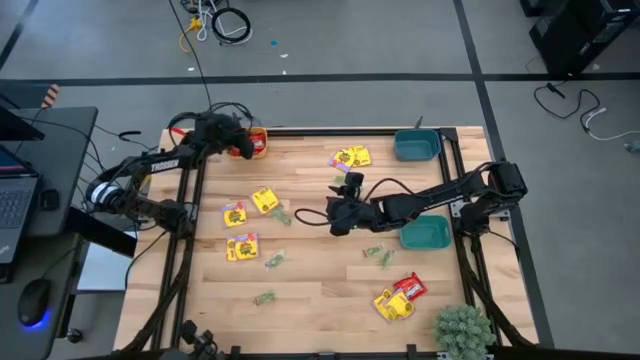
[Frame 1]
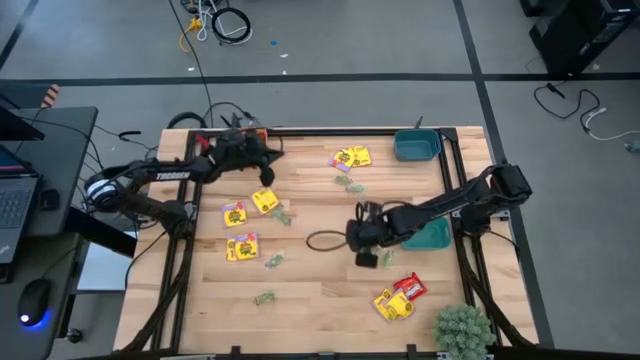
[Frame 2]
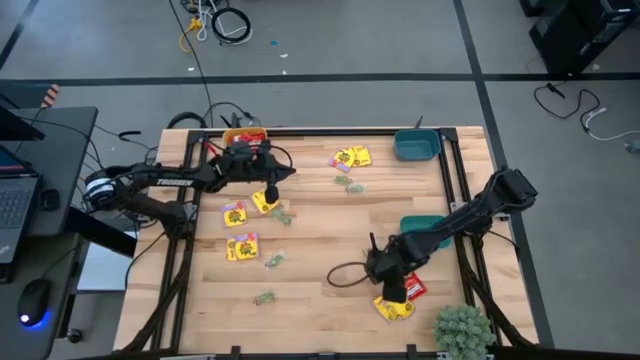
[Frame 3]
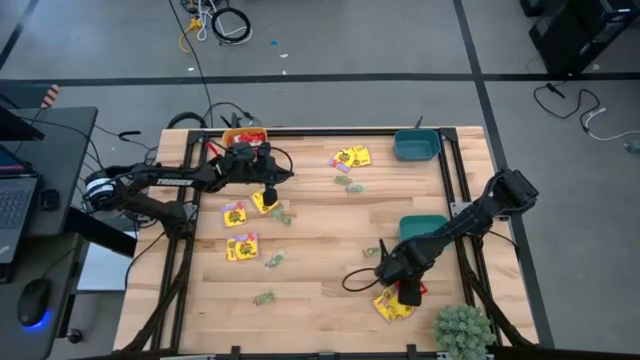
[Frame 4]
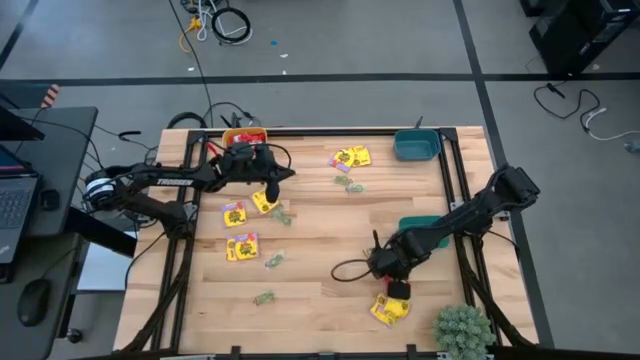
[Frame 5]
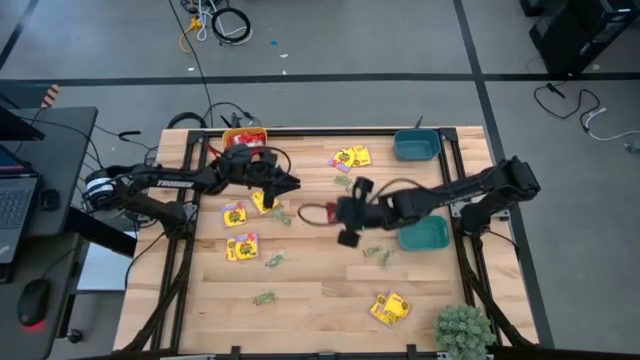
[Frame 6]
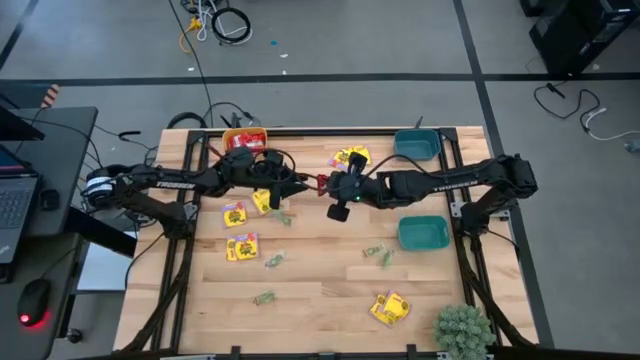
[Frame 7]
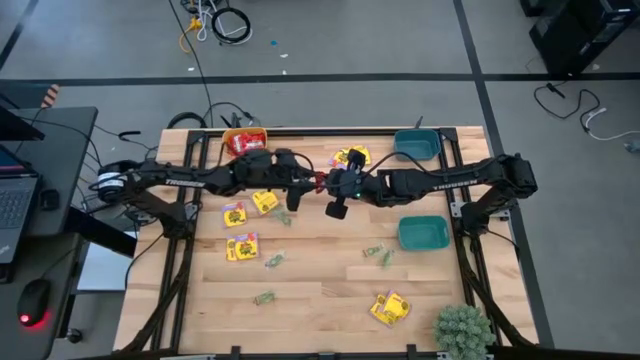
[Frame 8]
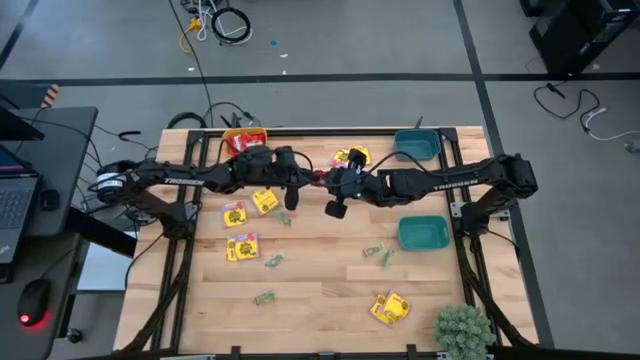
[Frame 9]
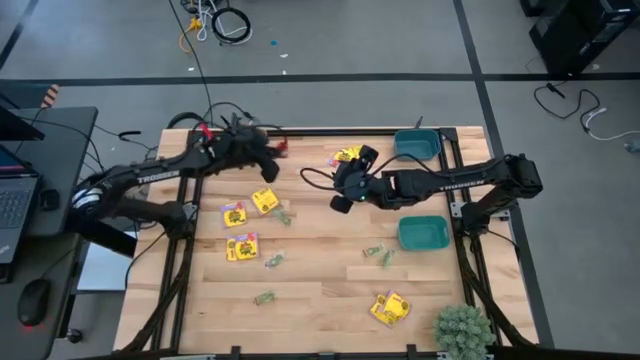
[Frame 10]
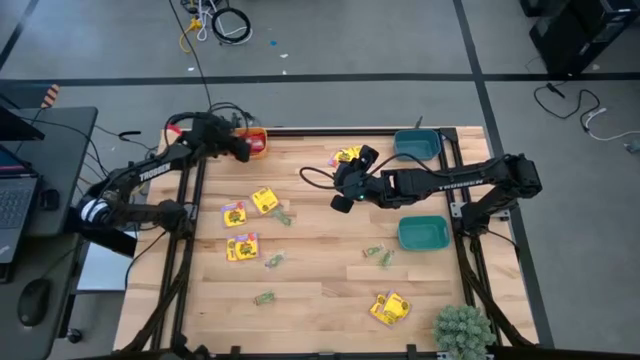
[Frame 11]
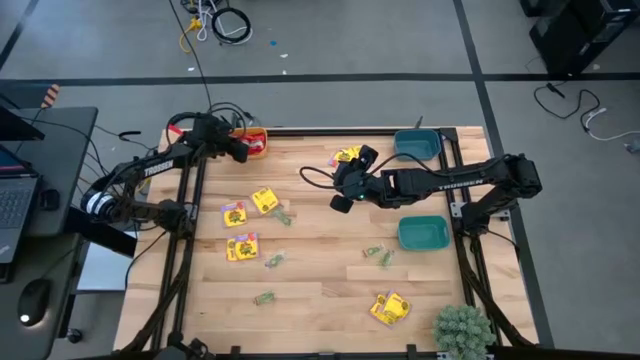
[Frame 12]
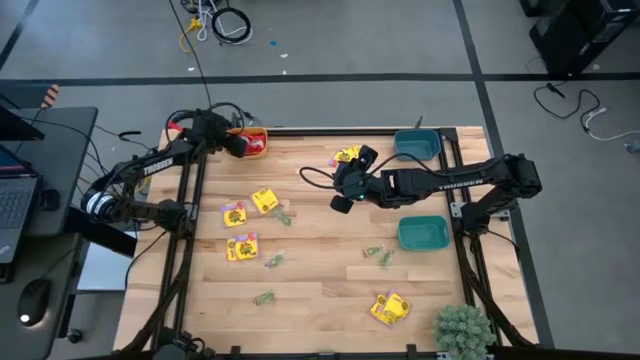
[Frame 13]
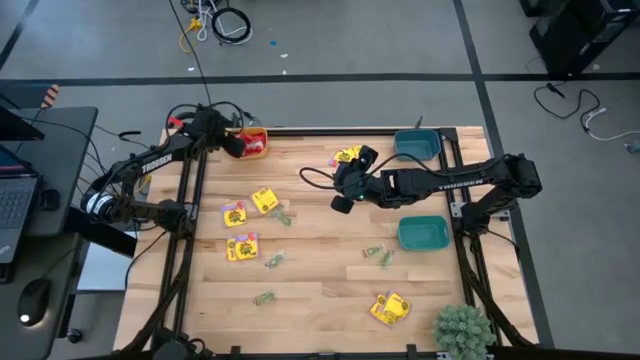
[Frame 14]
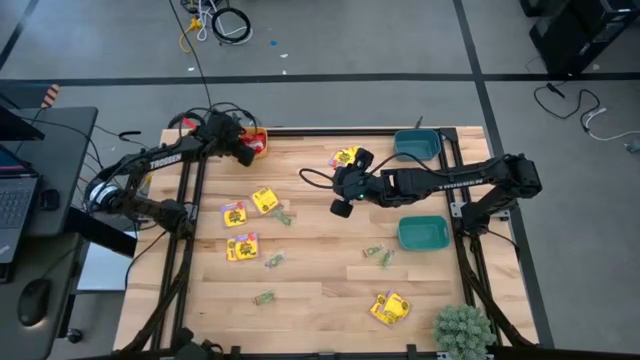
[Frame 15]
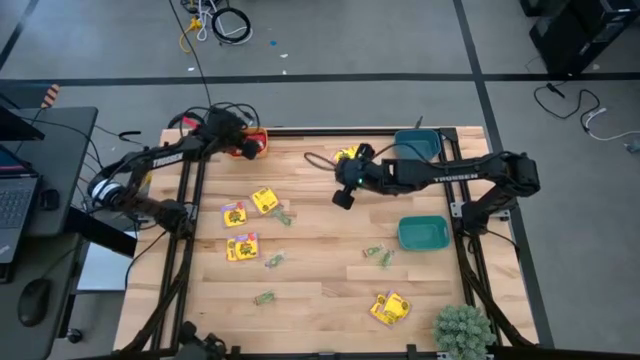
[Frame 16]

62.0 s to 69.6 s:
Task: Sort candy
Put the red candy into the yellow bin

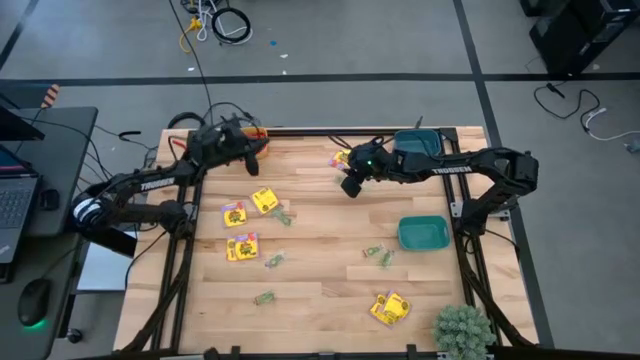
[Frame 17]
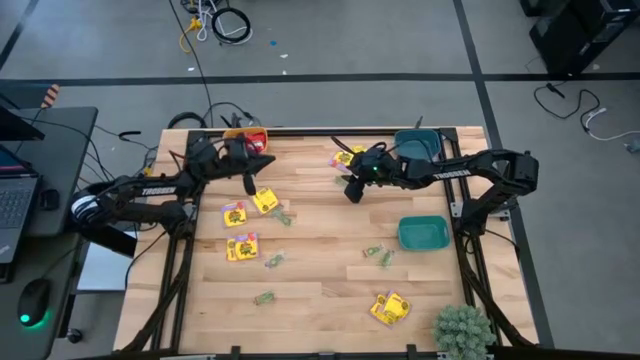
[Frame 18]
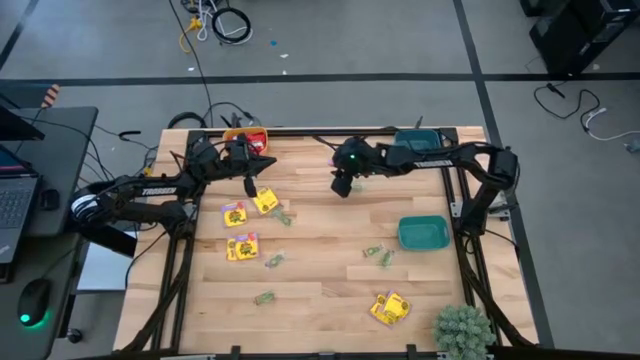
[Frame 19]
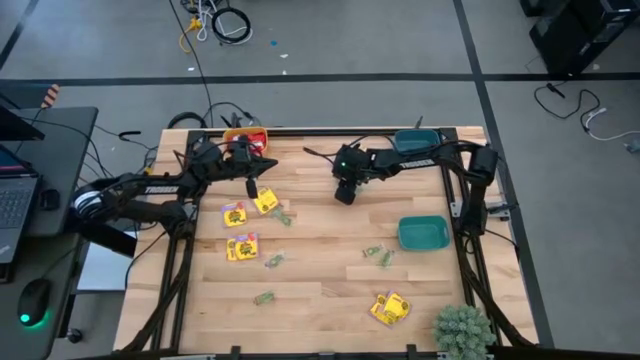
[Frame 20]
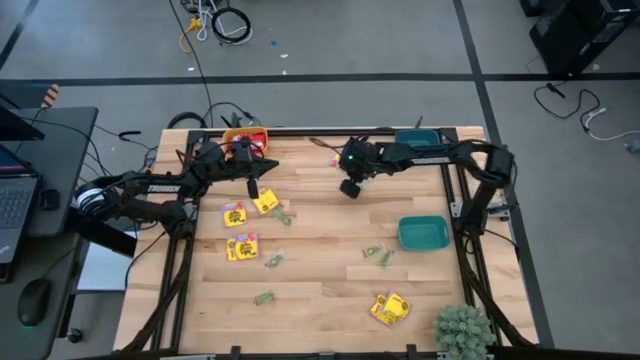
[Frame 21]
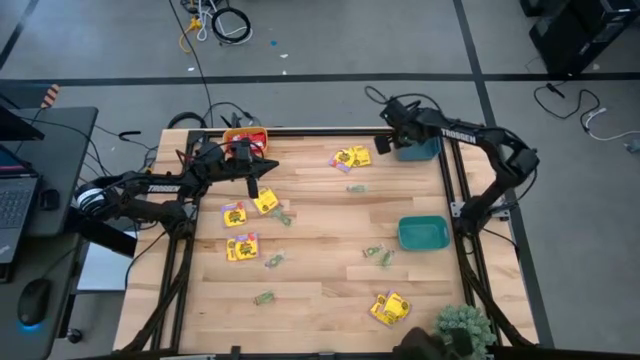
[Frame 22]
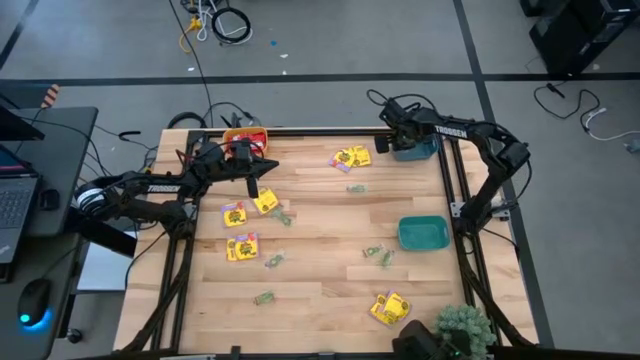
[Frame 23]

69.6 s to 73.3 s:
Put the green gummy into the blue bin

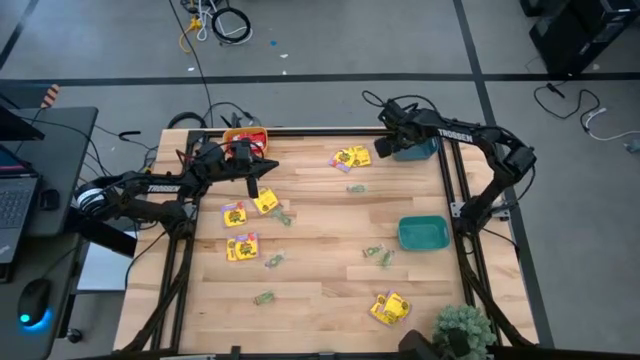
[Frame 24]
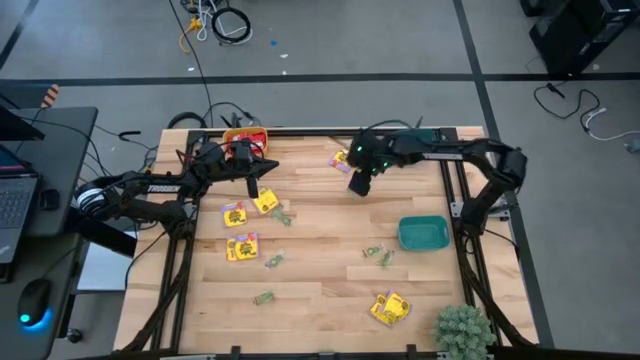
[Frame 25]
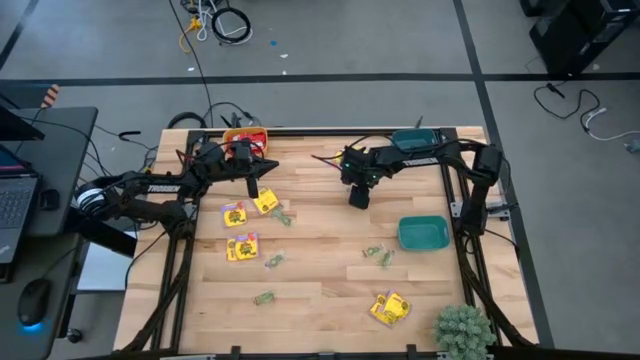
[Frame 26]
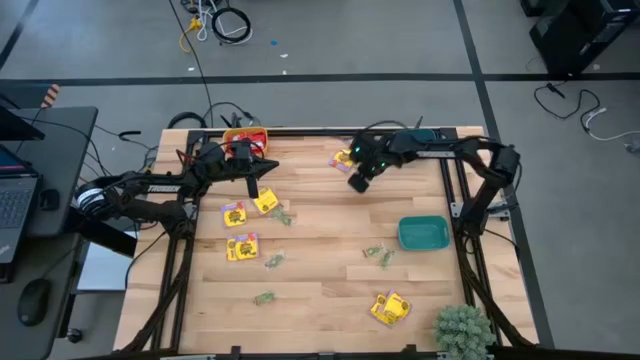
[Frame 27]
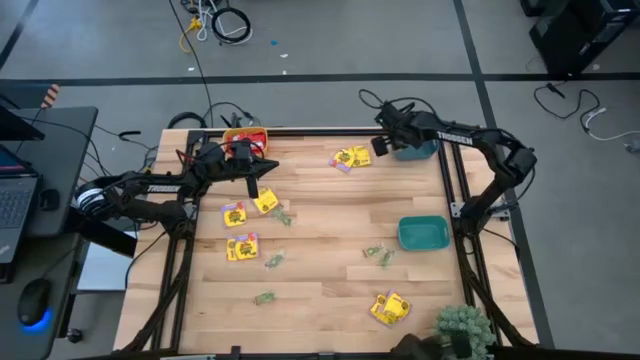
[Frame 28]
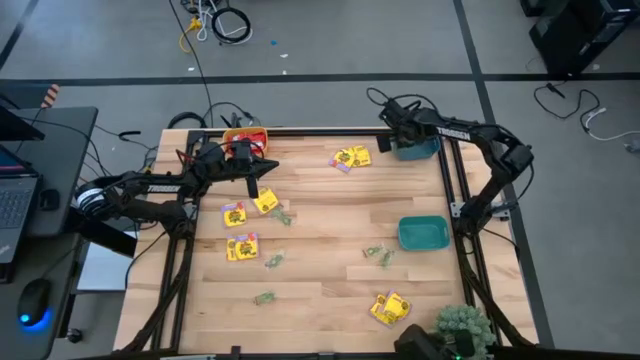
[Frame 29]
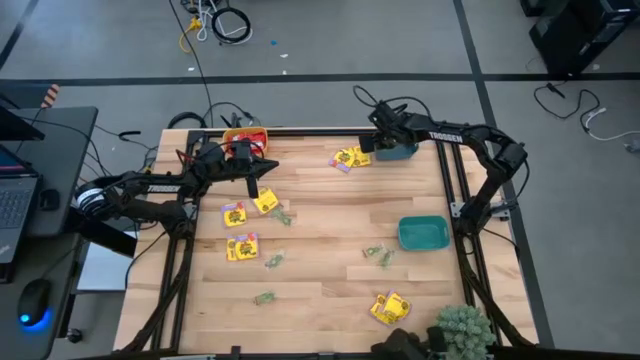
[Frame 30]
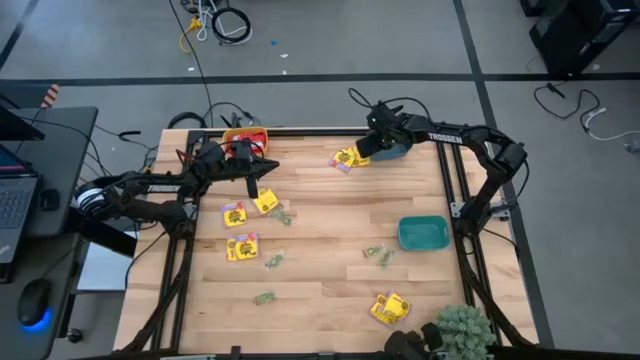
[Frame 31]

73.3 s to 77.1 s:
Put the green gummy into the blue bin

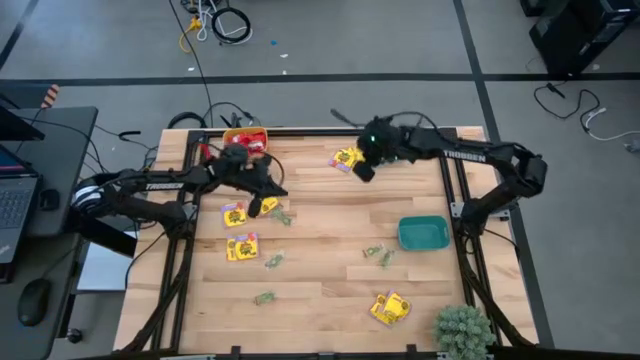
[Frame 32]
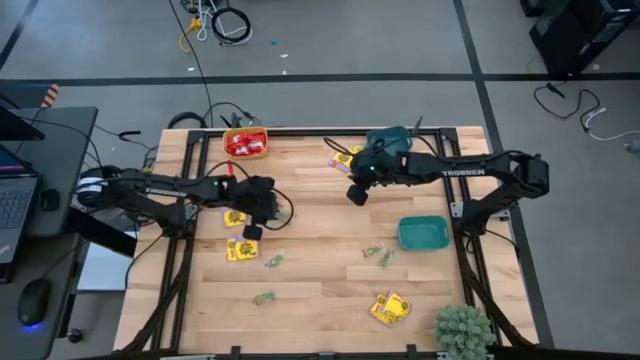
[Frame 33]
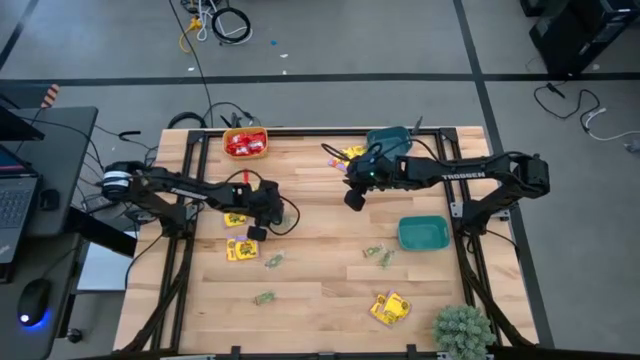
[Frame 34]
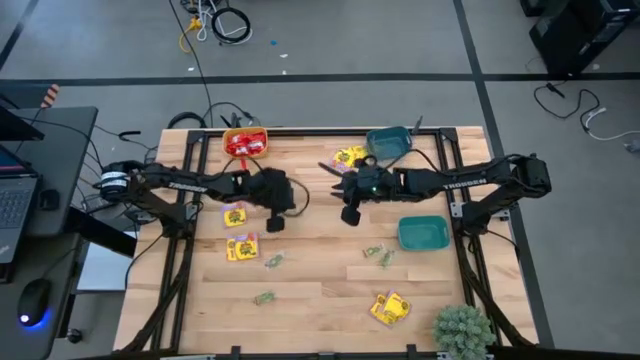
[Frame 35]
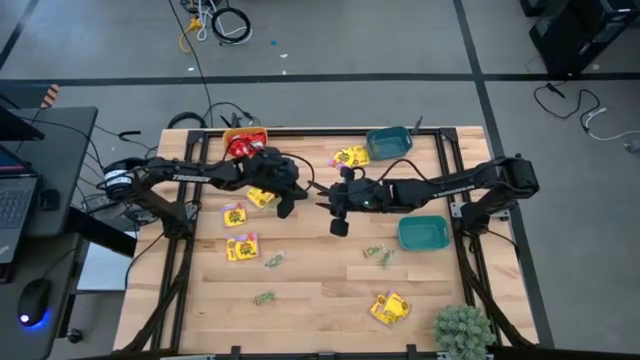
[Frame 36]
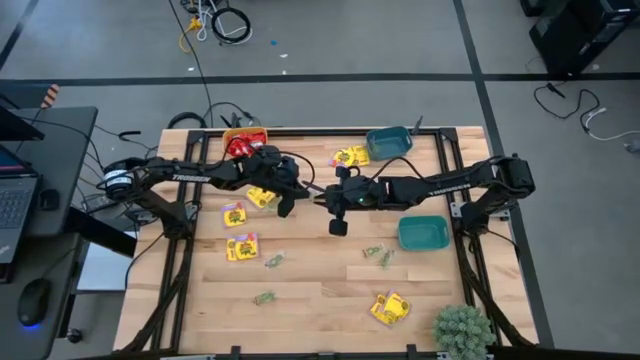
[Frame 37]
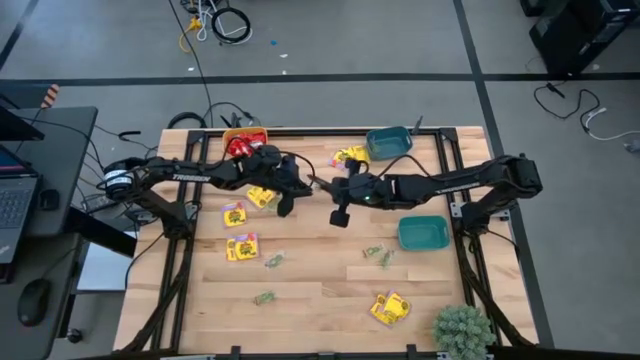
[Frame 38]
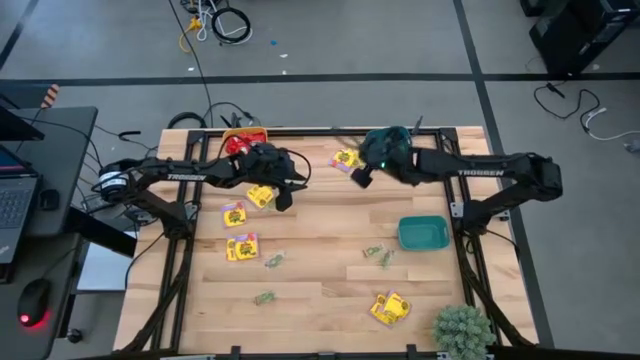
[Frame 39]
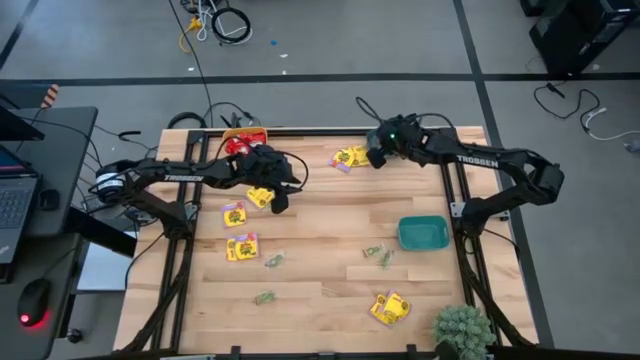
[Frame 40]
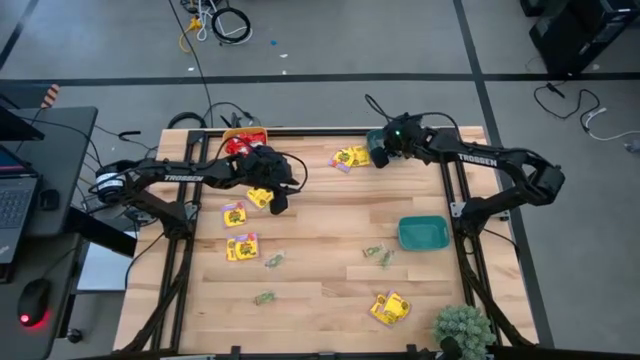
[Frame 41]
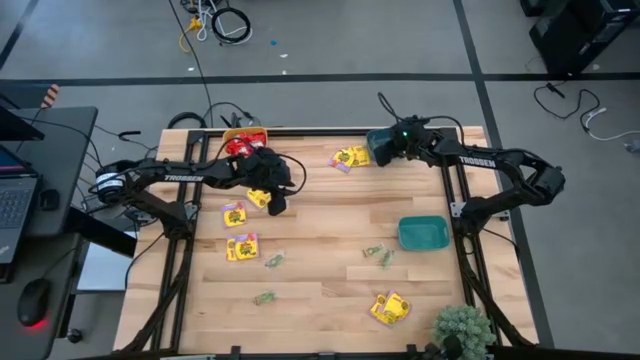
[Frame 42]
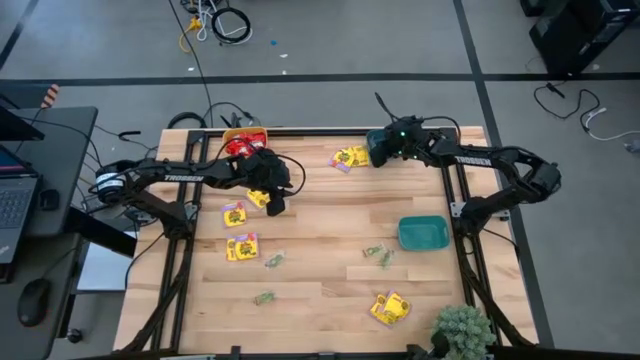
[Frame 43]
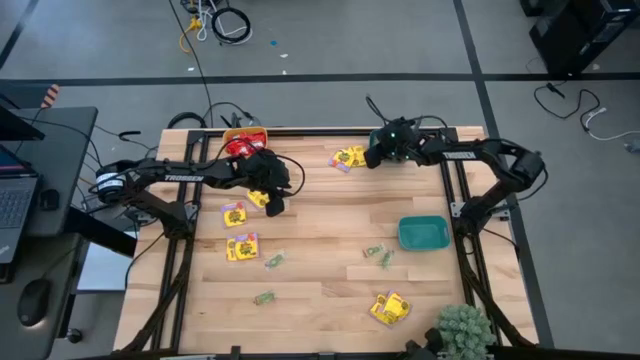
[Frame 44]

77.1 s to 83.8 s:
Put the green gummy into the blue bin
